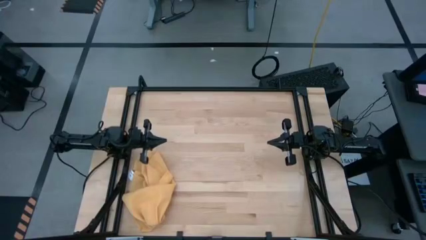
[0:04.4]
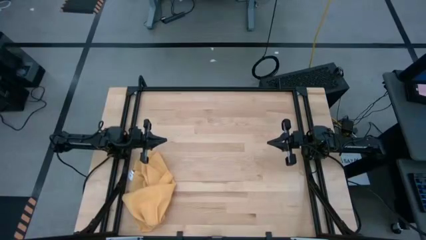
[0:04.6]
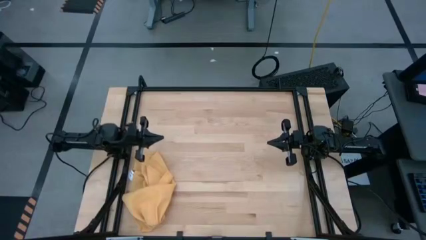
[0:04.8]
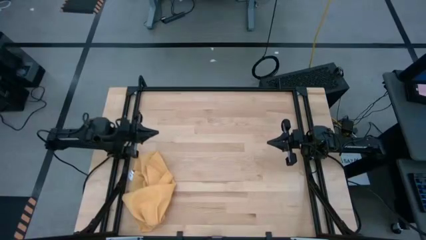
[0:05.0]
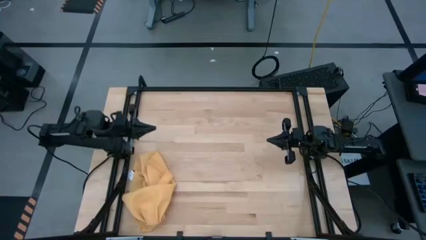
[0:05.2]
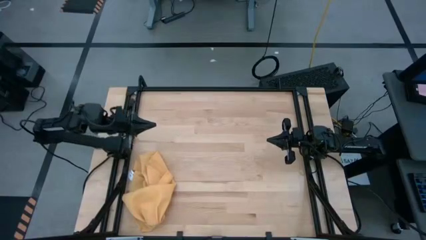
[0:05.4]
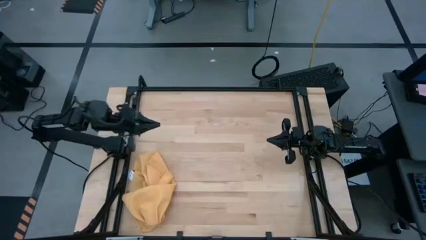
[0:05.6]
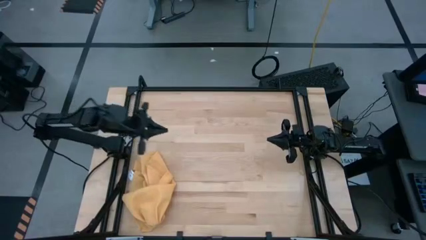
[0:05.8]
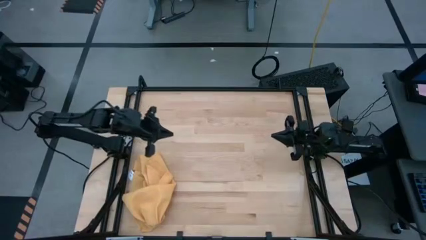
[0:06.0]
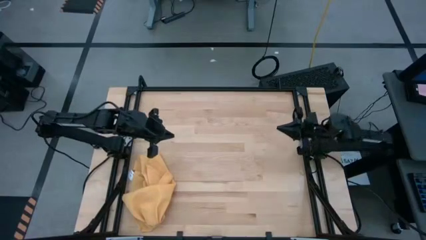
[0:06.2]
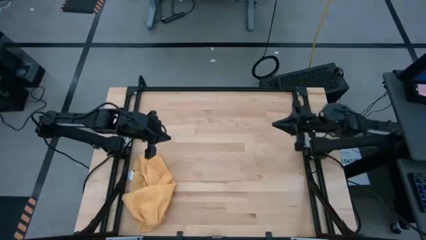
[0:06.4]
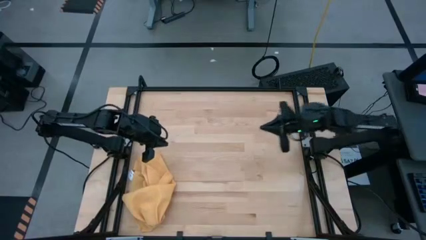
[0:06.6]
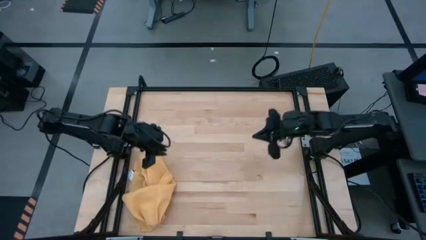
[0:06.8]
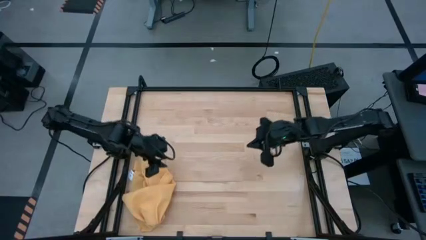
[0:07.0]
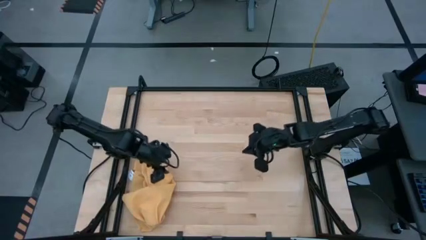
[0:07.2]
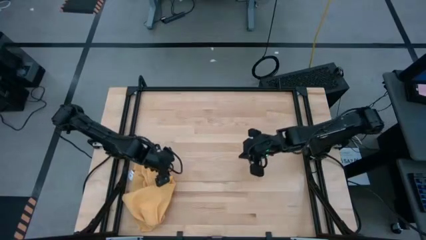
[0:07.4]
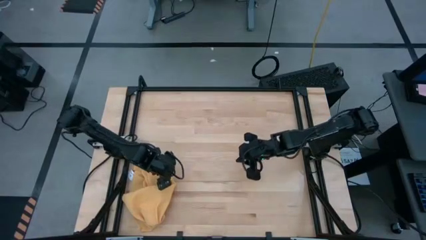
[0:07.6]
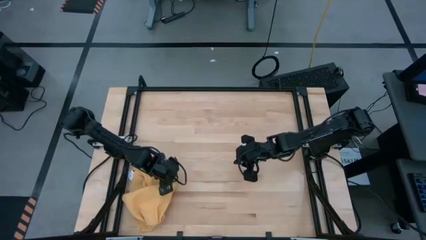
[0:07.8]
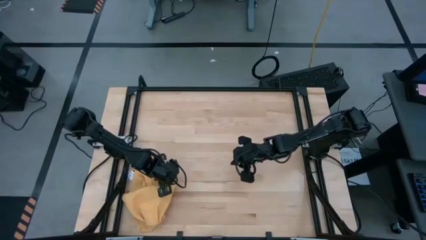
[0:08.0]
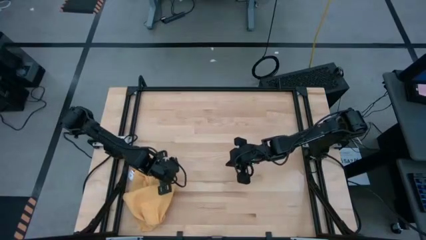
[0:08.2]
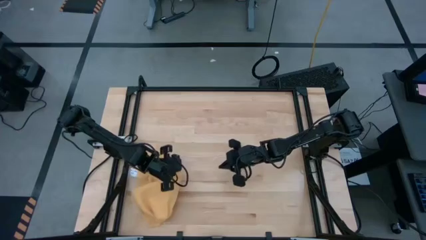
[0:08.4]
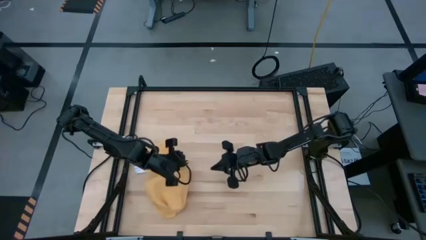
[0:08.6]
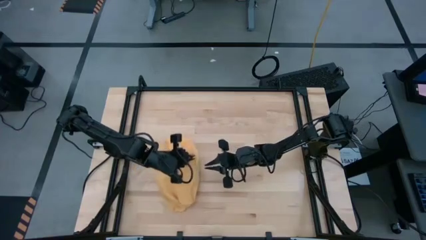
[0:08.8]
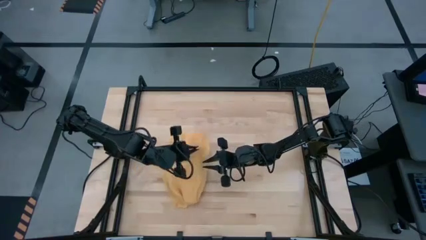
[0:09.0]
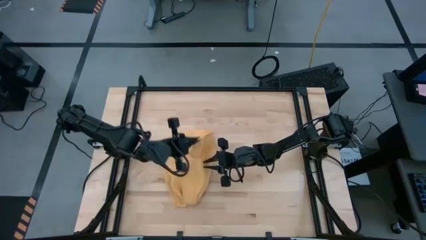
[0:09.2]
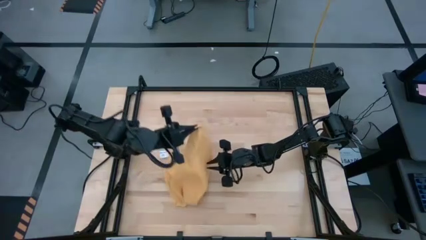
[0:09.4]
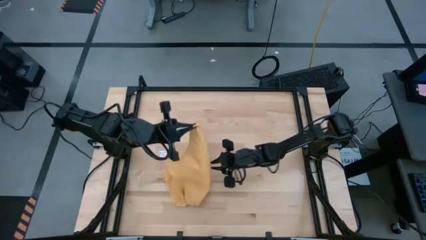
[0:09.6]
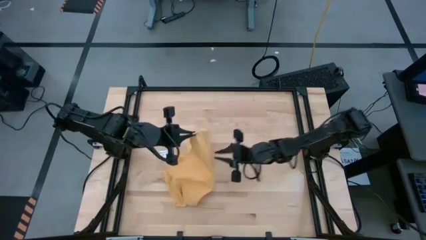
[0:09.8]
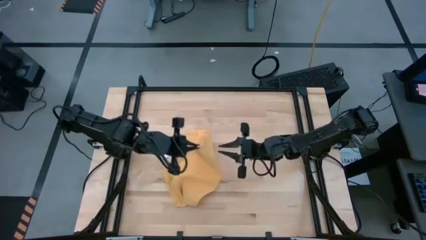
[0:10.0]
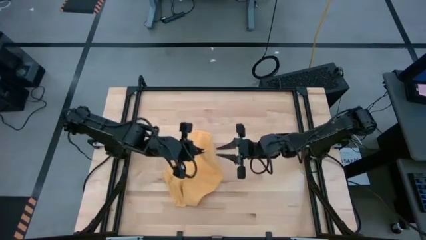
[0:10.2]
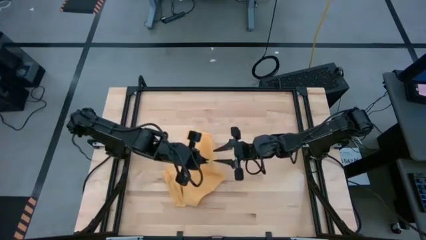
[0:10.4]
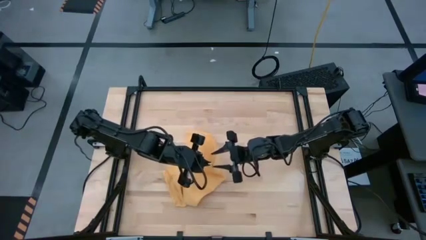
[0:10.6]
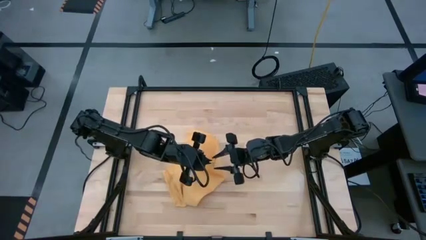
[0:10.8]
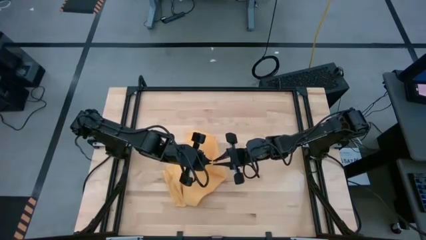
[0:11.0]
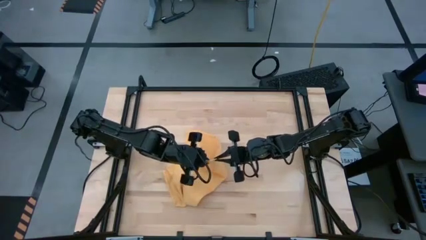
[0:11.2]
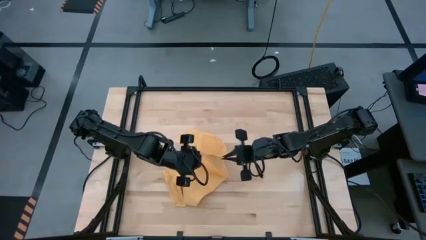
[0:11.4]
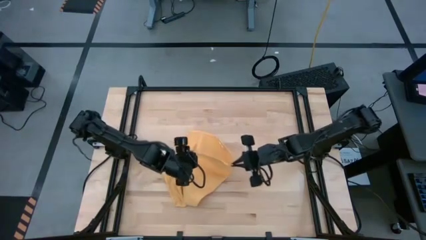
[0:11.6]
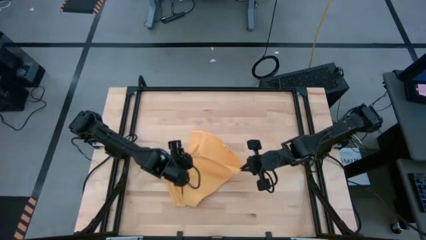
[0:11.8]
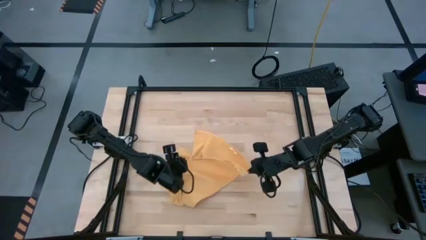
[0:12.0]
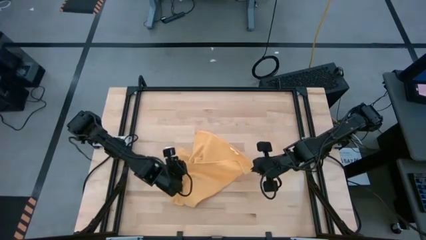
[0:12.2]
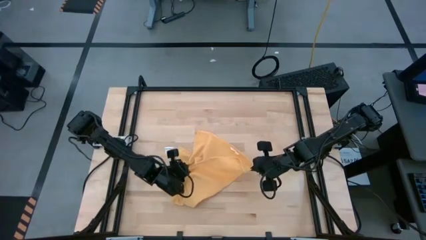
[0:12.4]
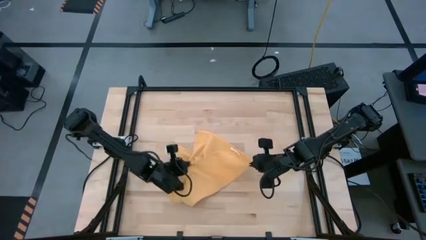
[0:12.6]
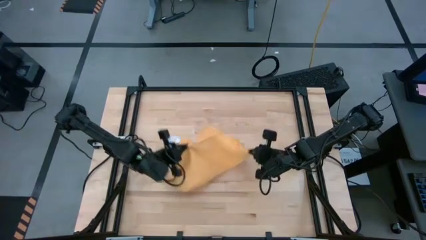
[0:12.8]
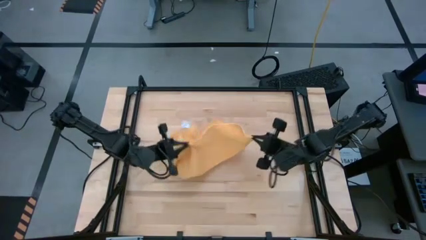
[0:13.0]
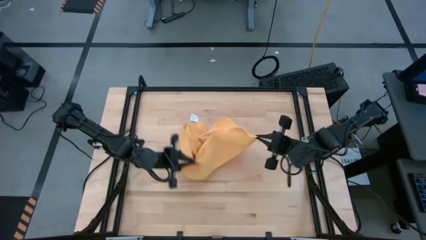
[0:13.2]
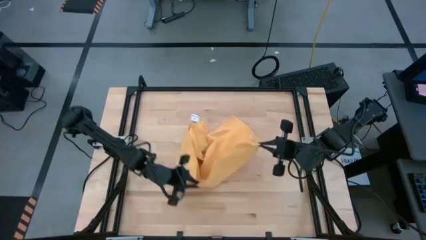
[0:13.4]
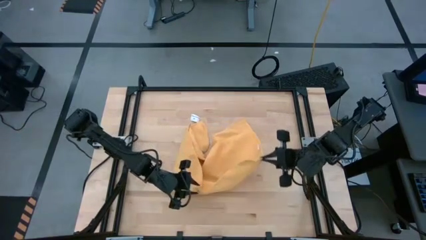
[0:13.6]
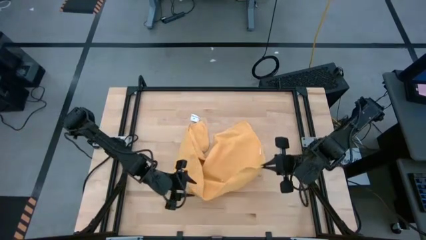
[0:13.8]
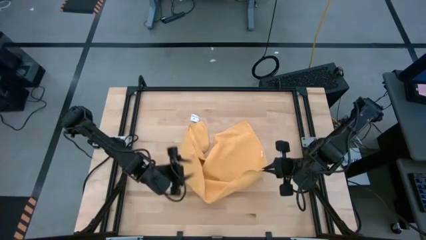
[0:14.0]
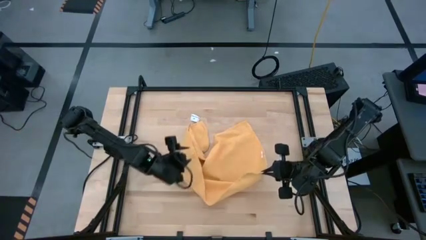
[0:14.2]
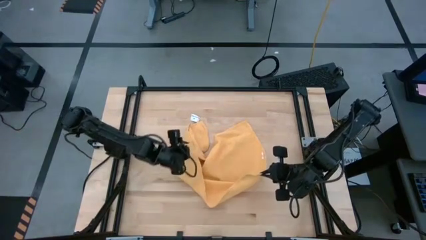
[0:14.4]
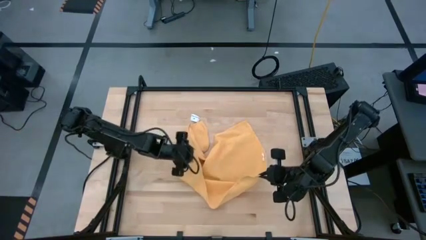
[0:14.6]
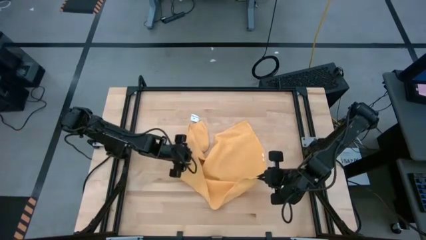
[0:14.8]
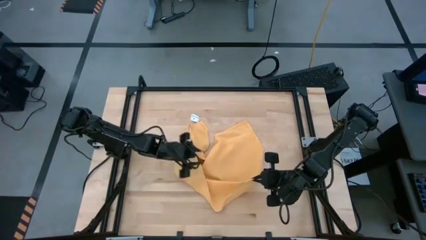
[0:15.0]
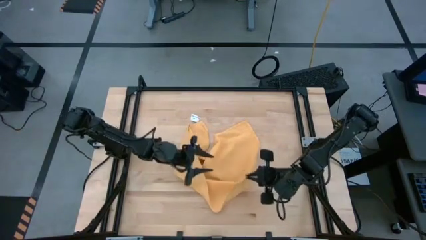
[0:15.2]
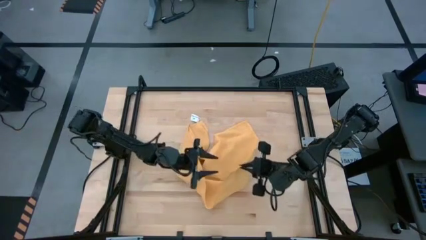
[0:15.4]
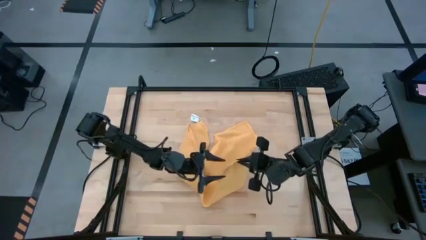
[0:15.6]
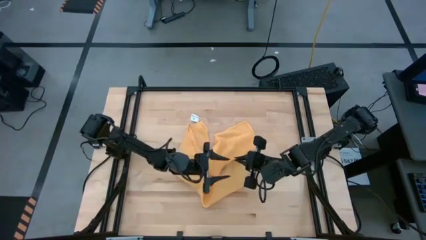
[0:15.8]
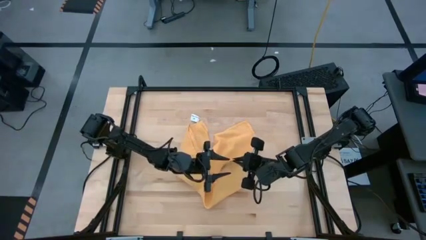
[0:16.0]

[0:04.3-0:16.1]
Task: Roll towel
Roll the yellow towel
